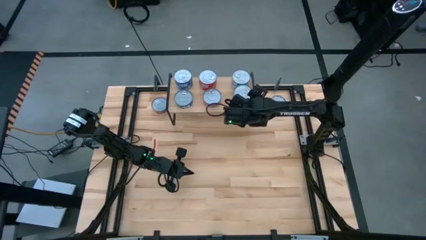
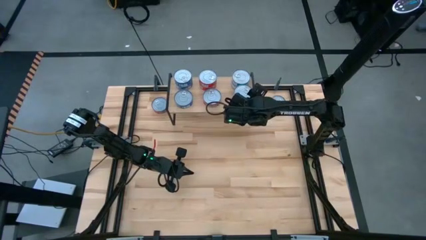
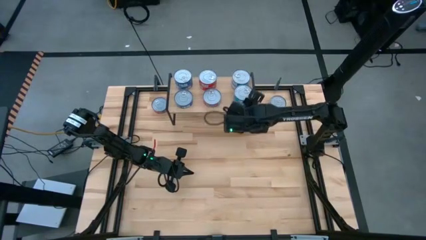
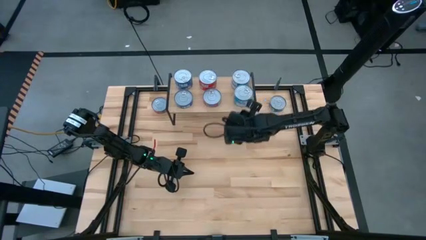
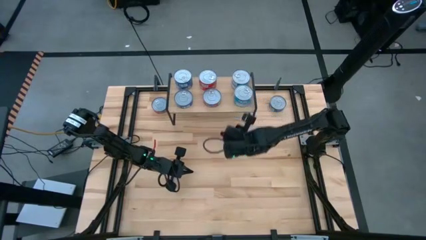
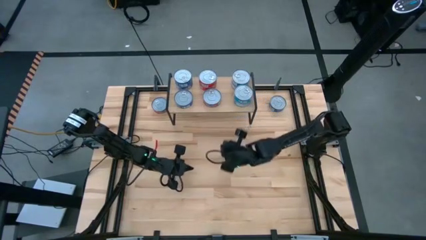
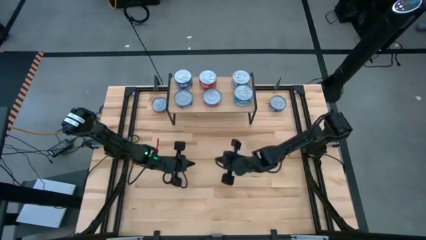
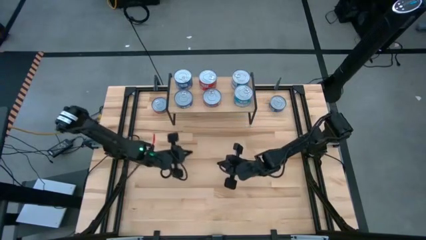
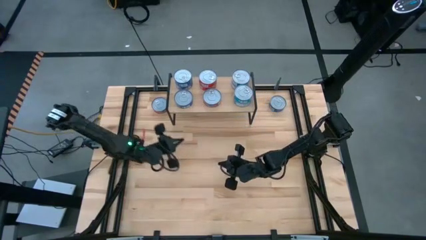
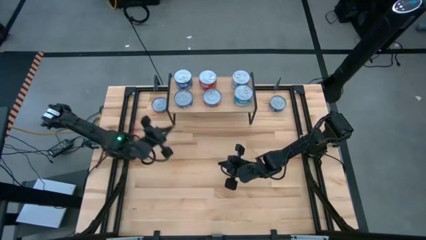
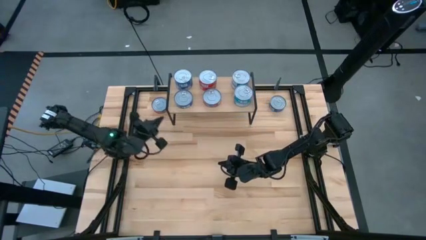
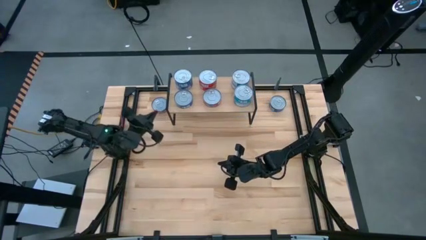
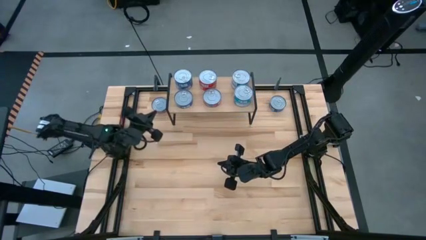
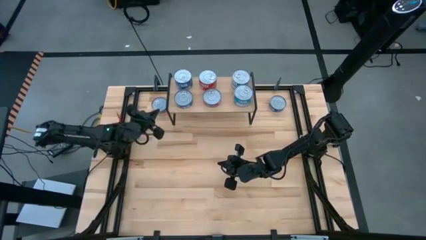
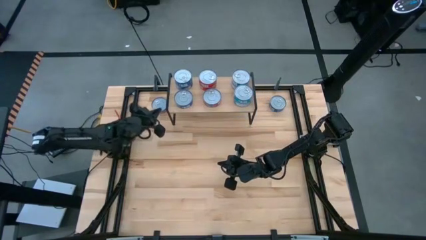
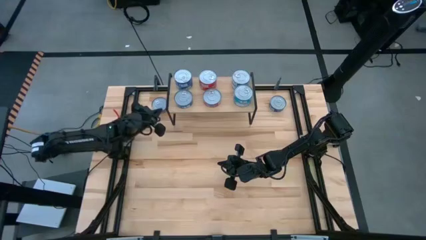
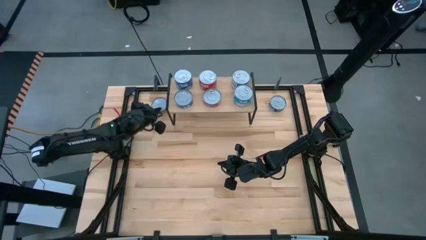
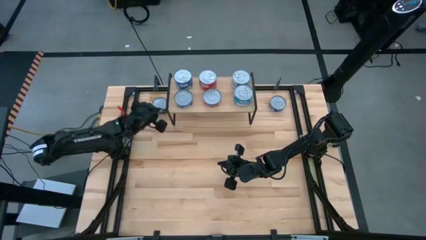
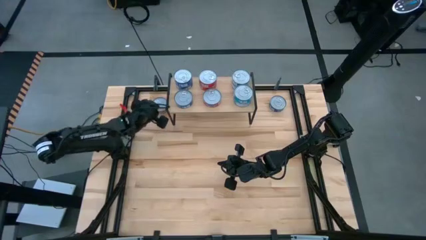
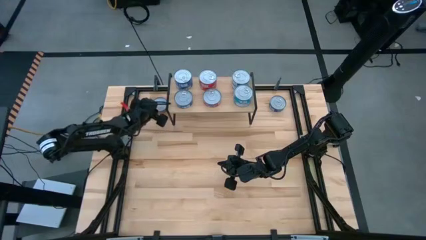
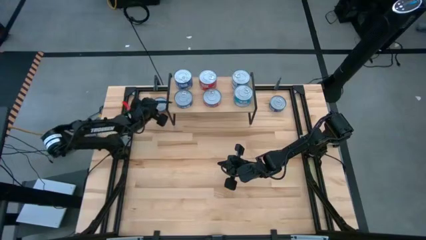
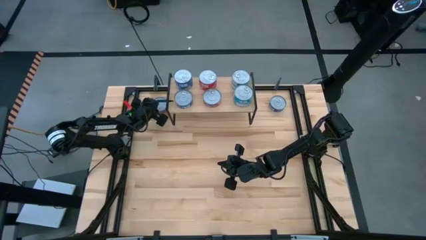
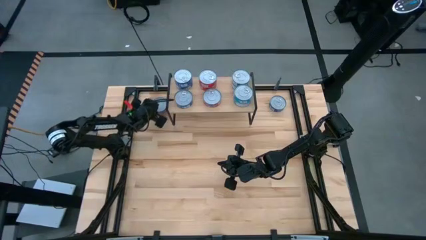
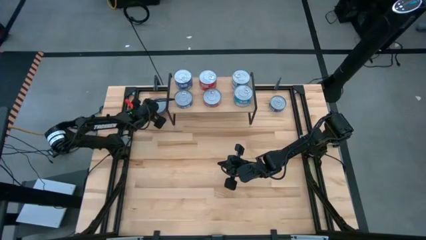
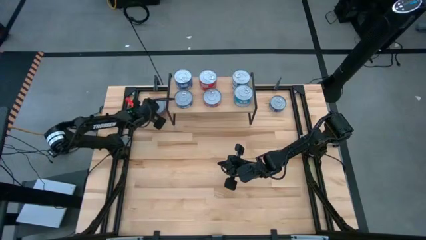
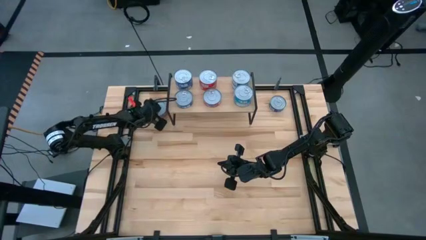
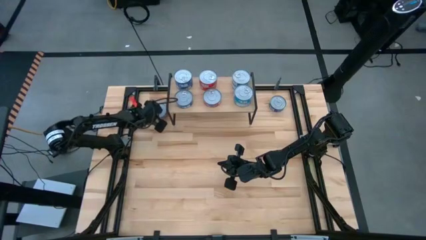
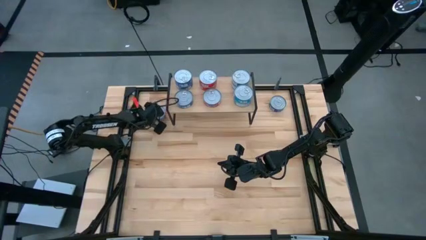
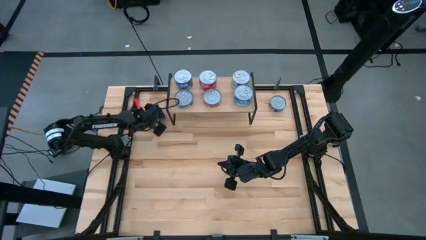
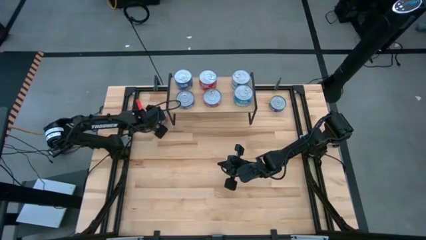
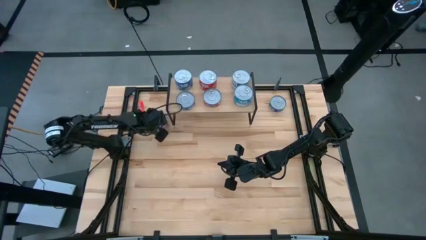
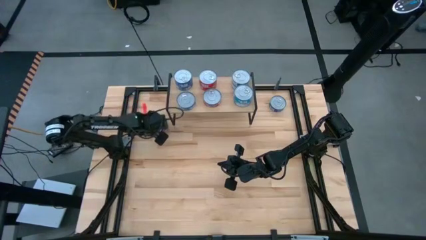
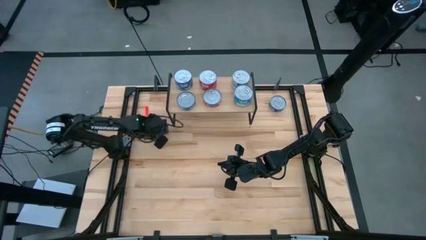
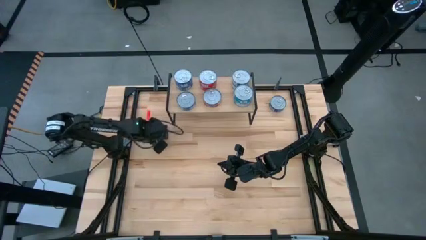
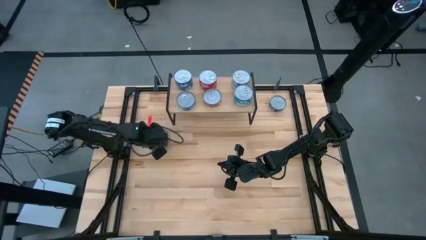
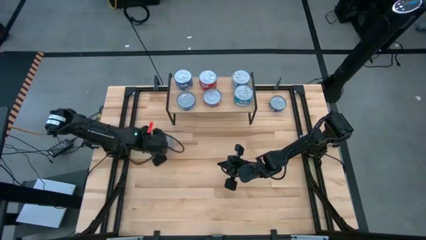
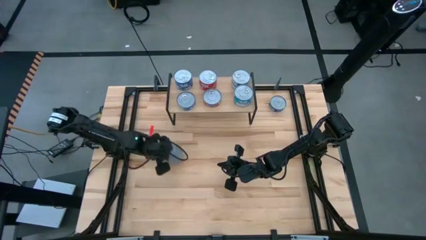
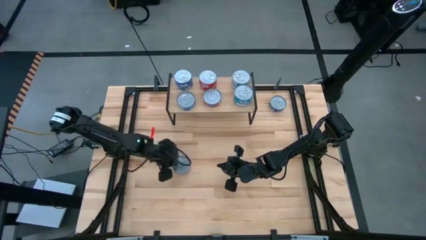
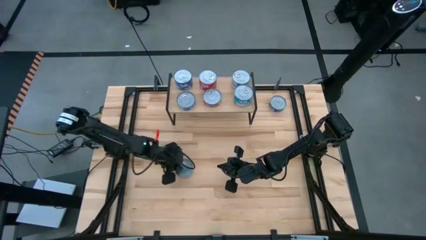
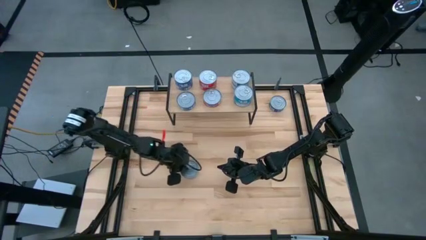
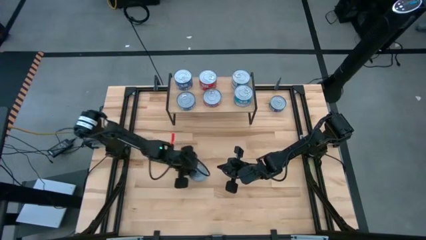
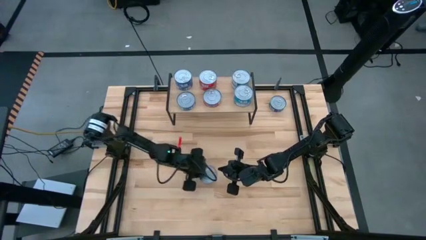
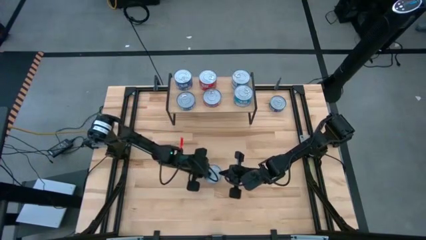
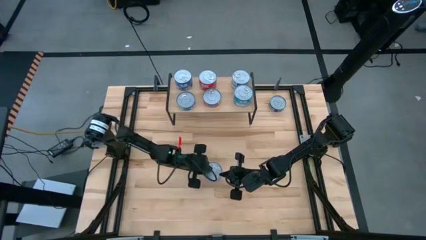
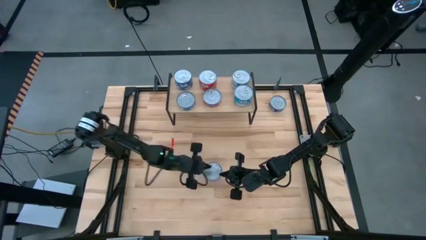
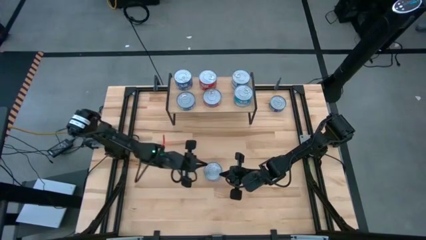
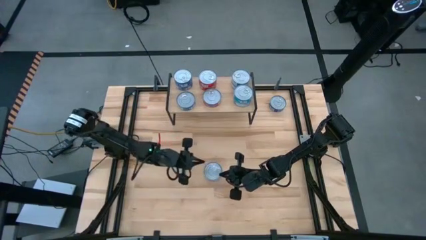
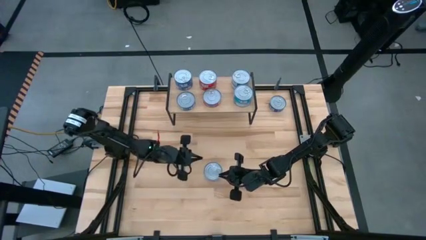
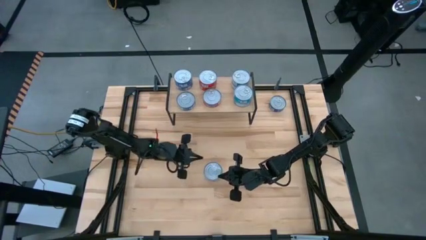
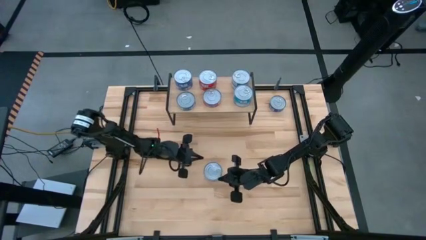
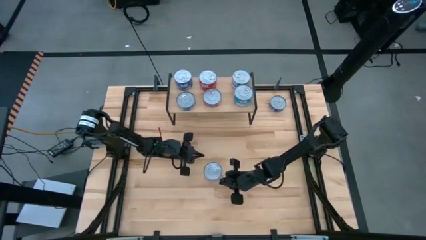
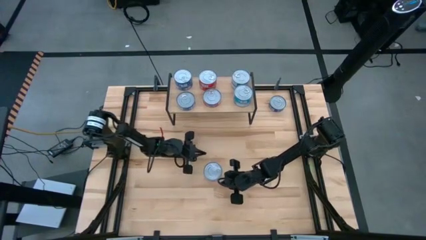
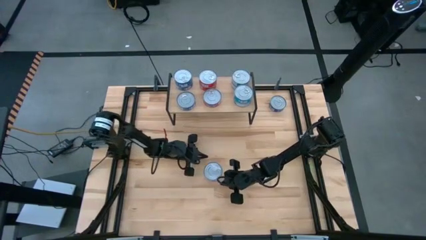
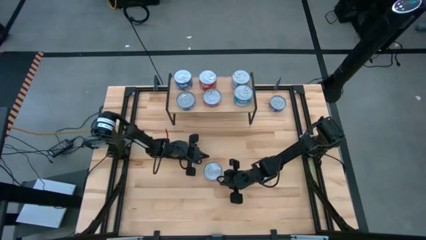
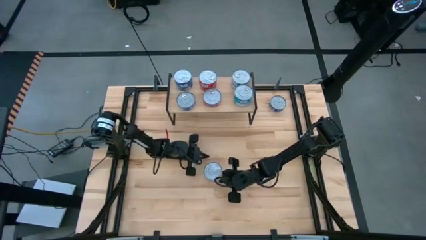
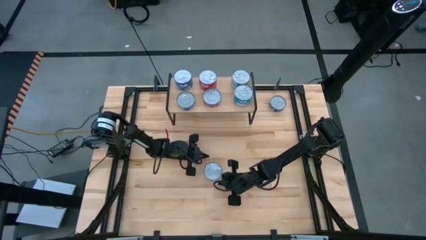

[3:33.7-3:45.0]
Task: Stack canned seafood by type on shelf
Stack the red tuna can on top of the red tuna can on the shelf
